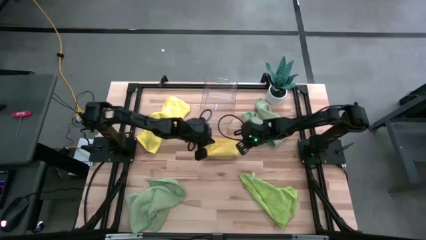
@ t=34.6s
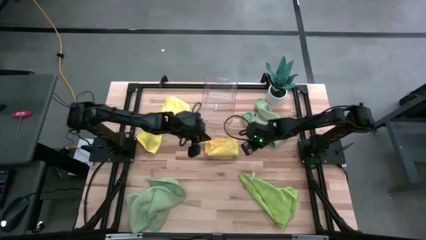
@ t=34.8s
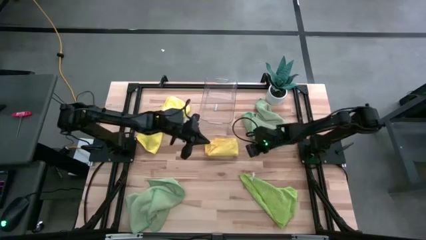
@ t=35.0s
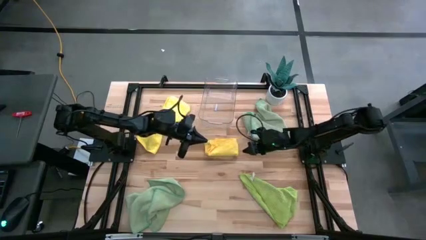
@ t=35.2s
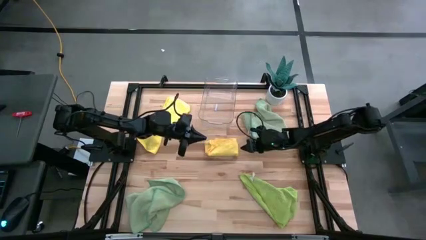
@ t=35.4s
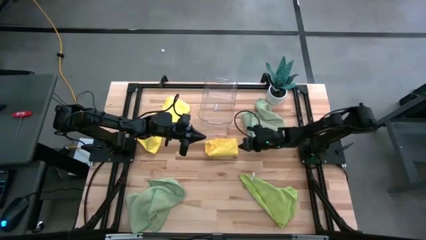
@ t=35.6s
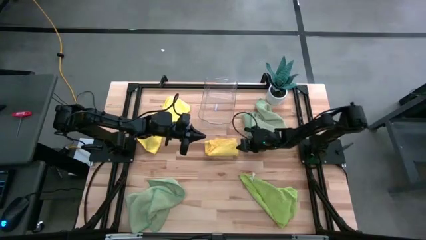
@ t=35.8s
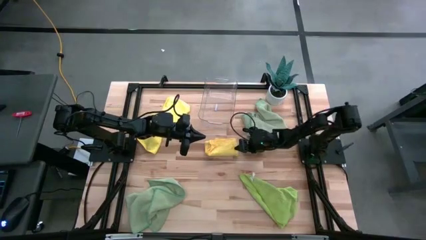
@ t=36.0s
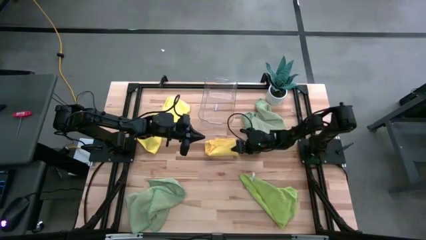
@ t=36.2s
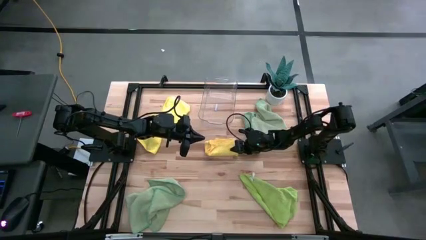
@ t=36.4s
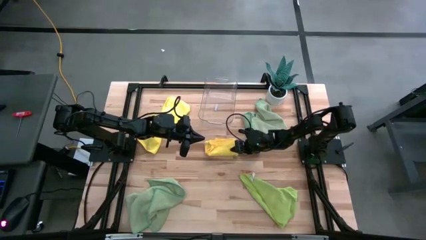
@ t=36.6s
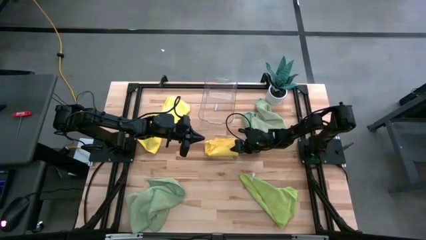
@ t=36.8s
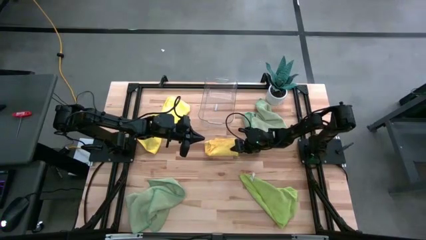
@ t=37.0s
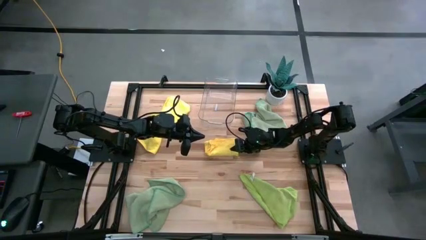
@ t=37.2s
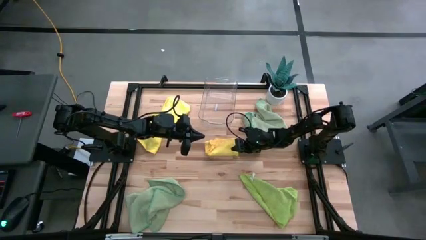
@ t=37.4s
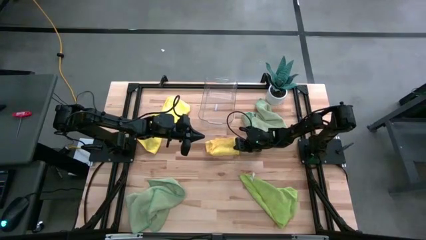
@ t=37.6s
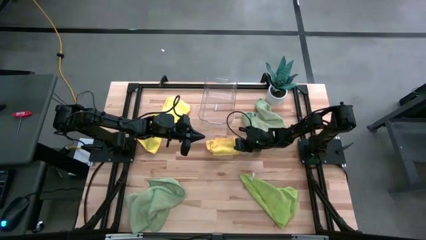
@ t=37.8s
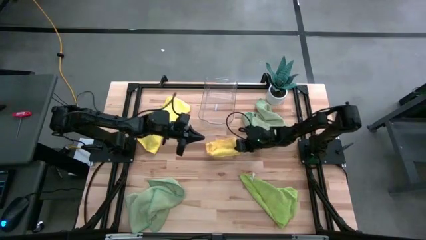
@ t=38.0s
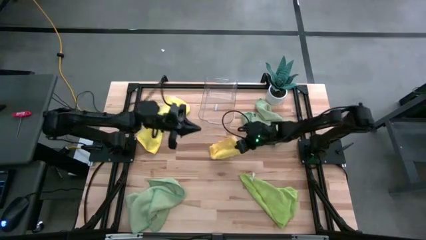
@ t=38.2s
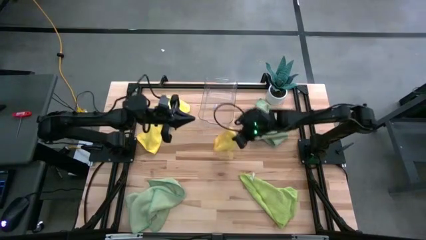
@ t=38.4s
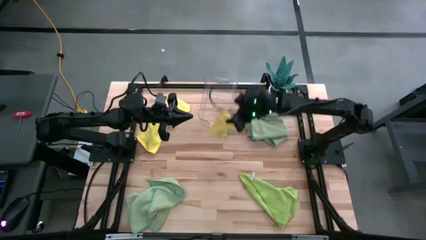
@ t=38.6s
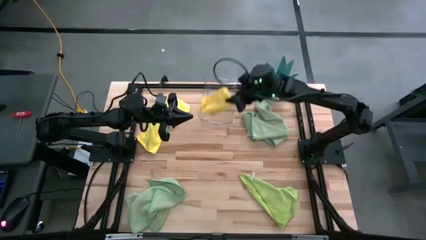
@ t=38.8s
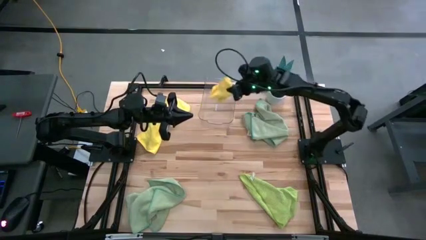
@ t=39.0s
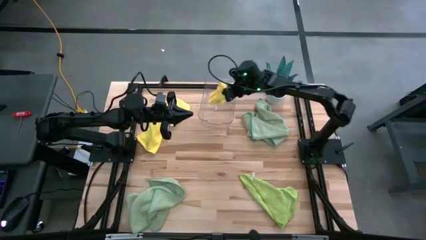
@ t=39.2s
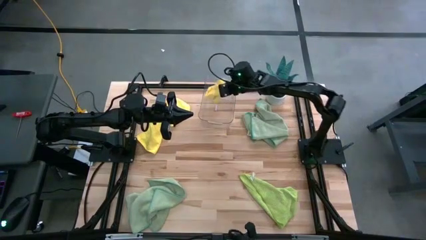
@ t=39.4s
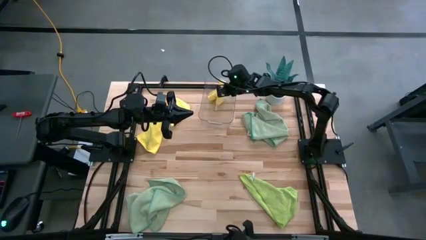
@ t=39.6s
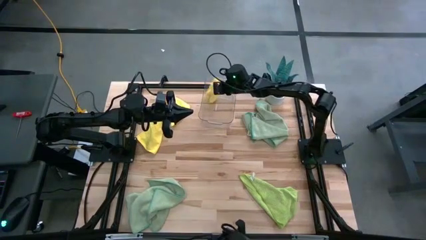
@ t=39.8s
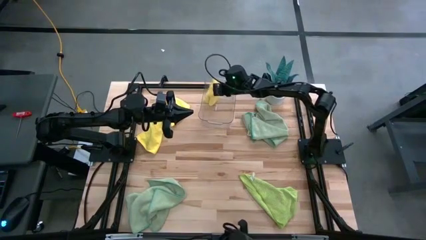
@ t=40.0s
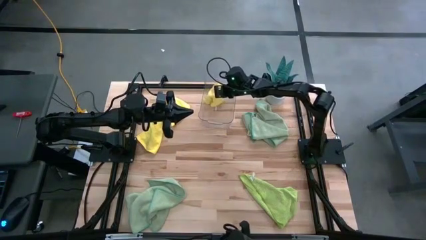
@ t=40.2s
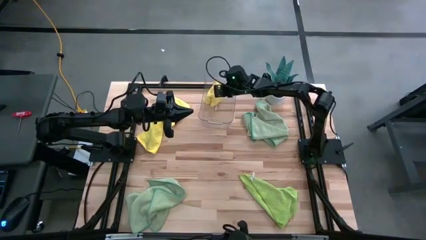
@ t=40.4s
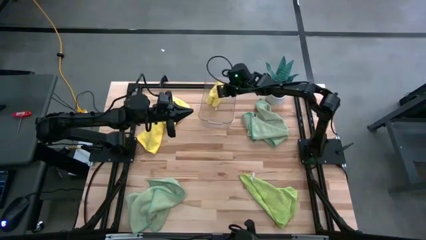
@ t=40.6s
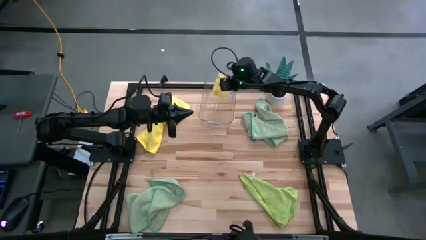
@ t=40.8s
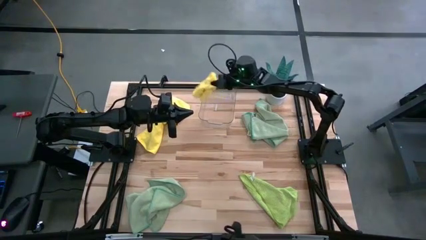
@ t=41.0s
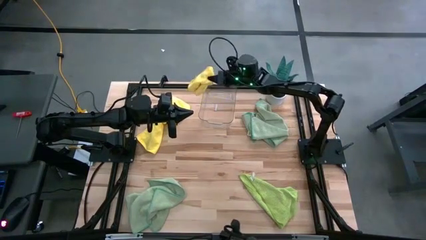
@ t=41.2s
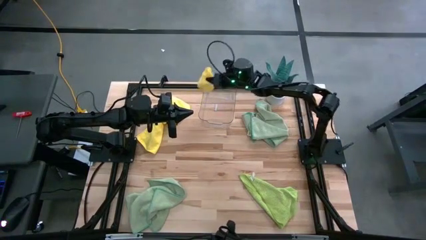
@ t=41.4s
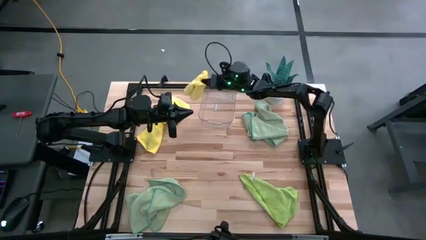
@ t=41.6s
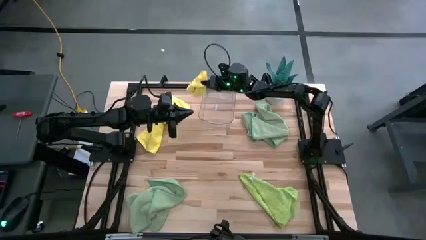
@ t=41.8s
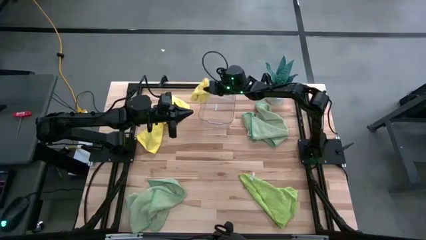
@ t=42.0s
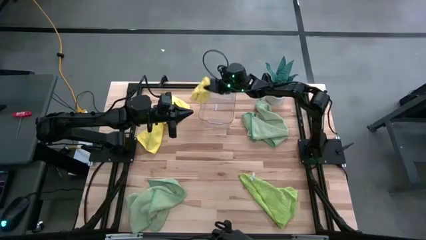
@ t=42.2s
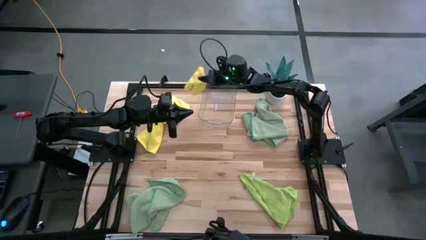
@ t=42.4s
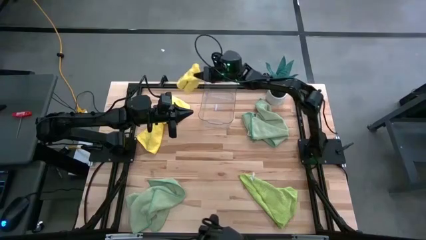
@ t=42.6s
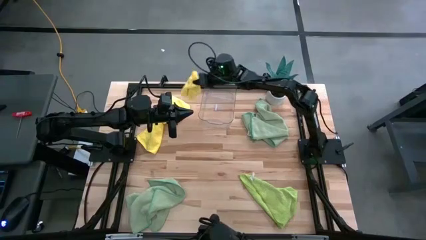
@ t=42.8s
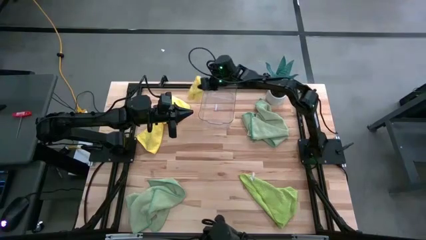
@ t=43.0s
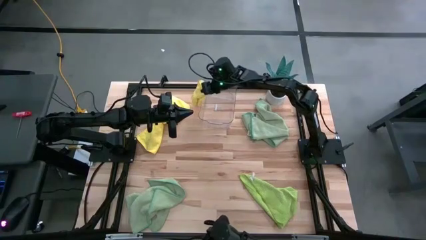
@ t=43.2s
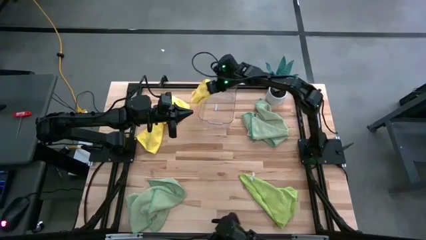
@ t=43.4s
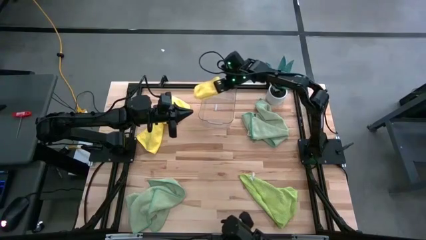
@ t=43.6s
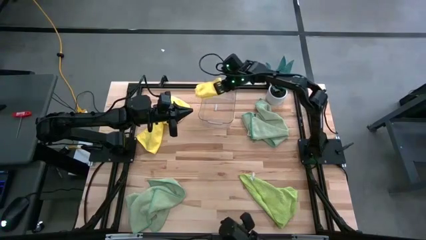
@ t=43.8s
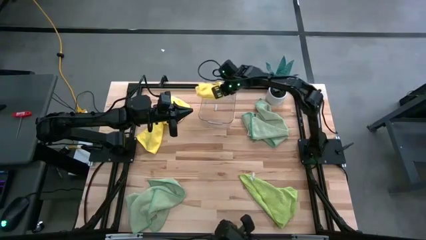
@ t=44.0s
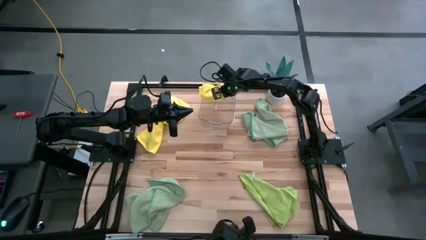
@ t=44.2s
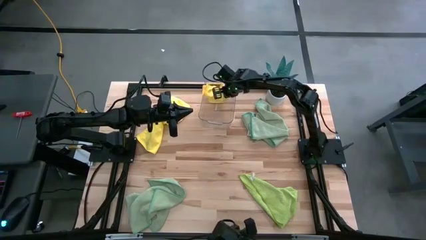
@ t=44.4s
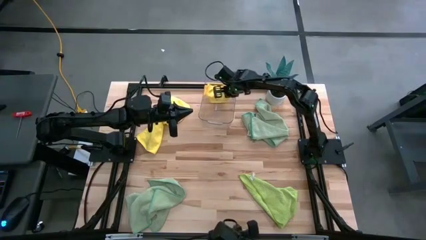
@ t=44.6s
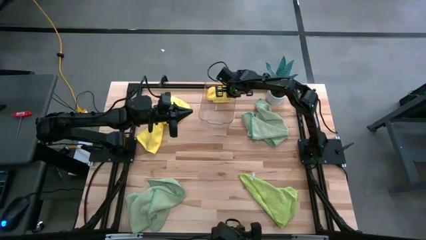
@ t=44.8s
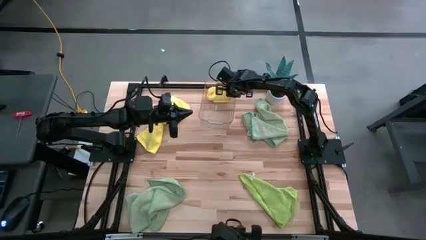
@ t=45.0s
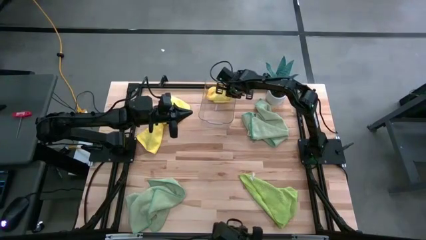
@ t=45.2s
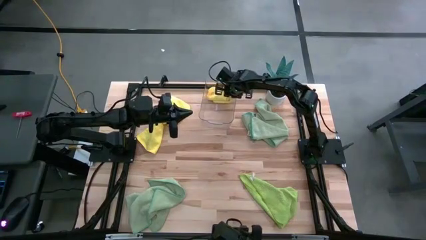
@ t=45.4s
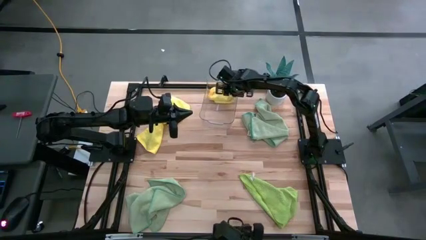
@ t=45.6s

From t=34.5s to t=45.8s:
Task: Fold microfiber towels
Put the folded right yellow towel into the transparent bin

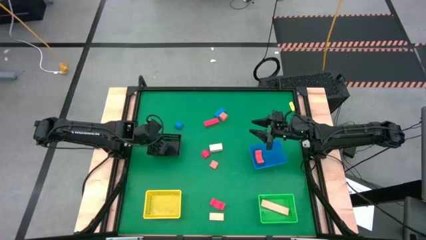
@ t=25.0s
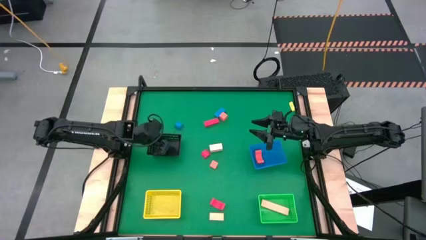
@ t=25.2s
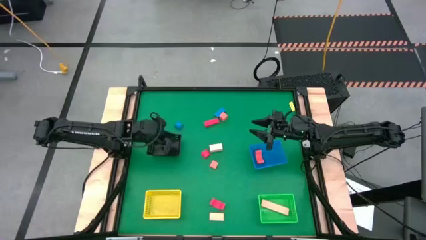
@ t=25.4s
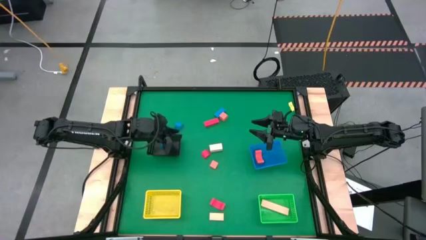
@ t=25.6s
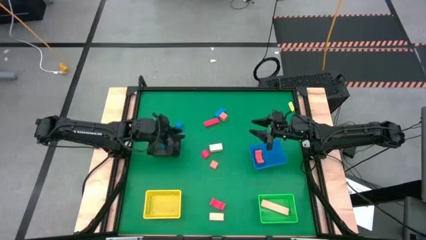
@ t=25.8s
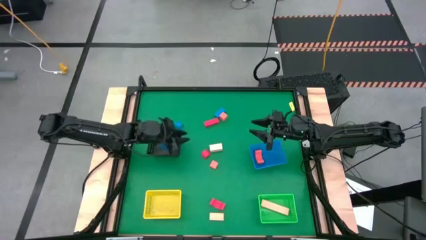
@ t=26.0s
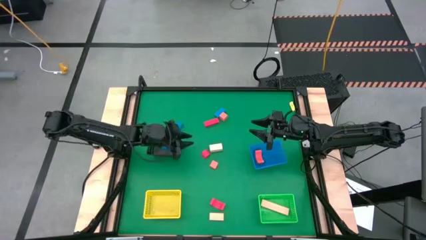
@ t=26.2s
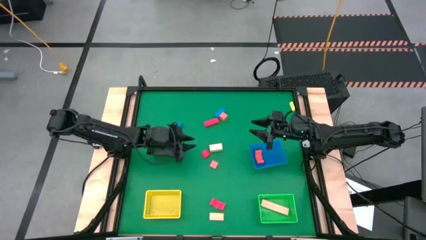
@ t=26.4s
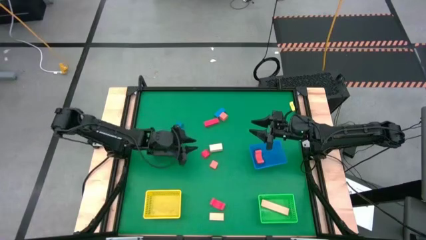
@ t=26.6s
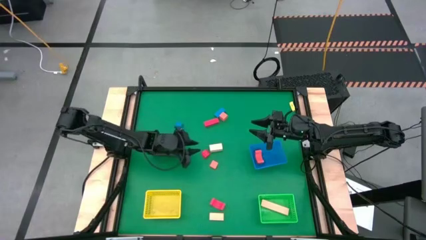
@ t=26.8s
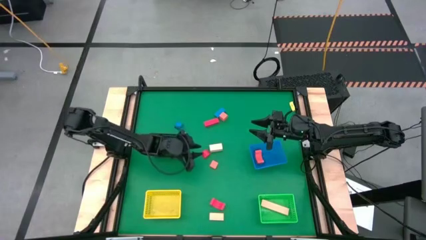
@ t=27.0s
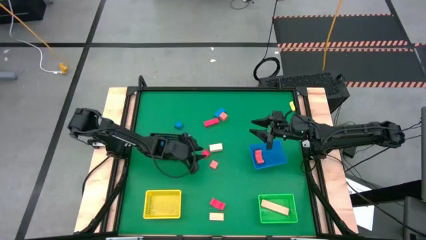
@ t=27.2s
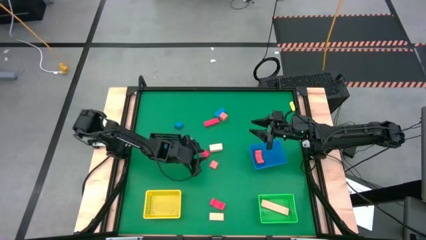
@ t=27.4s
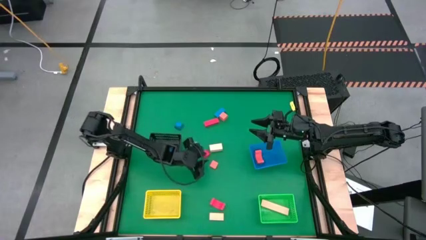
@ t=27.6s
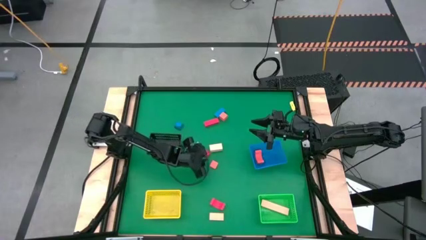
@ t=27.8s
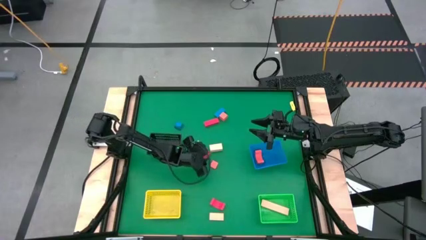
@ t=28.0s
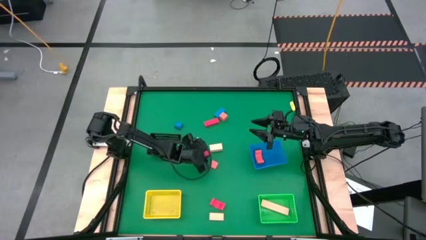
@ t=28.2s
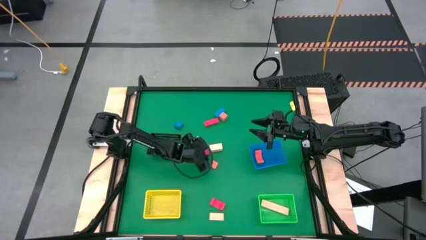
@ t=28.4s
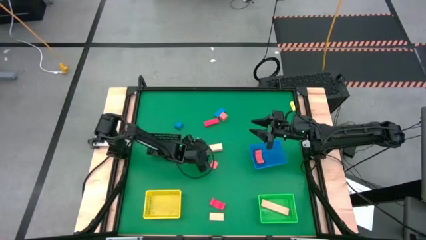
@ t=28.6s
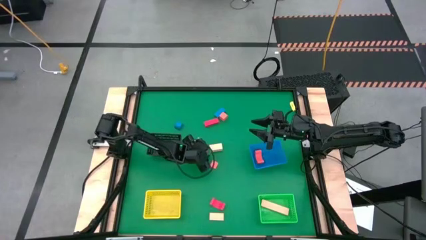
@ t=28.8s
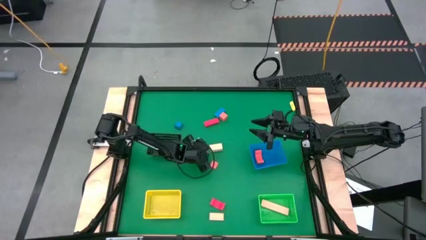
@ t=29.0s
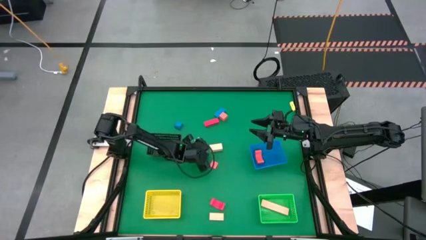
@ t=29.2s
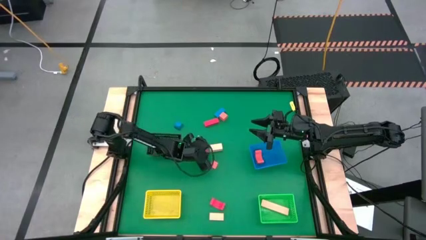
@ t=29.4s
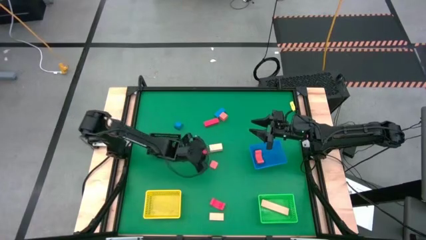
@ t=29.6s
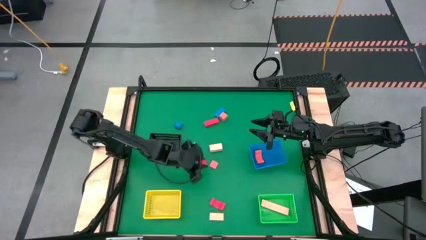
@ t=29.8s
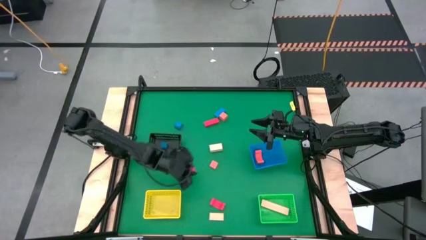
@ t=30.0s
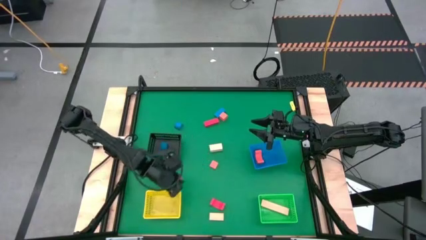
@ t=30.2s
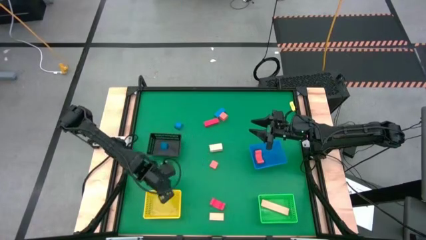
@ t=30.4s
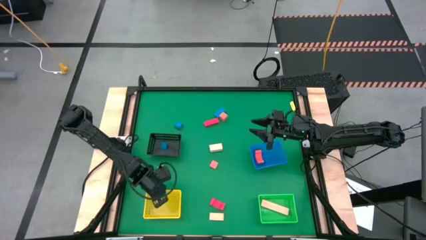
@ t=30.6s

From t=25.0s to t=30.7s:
Task: Sort & place blocks by color
Put the center red block into the yellow bin
